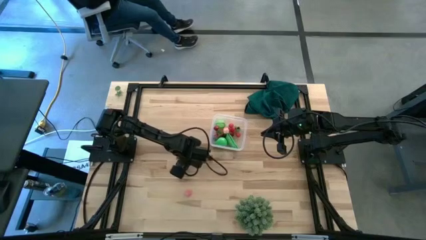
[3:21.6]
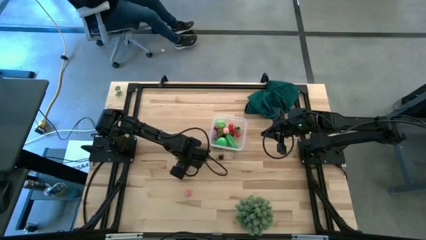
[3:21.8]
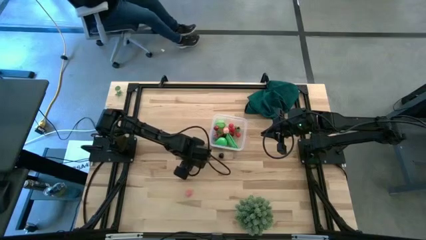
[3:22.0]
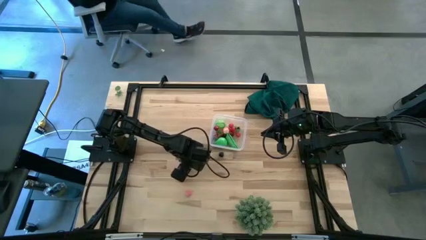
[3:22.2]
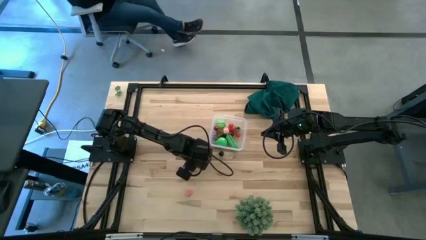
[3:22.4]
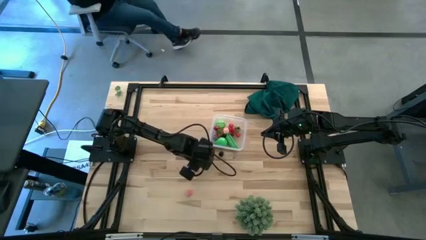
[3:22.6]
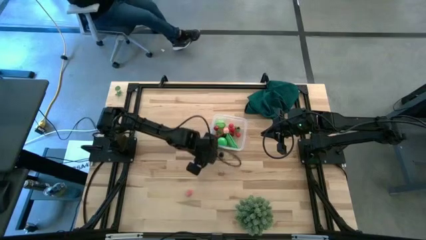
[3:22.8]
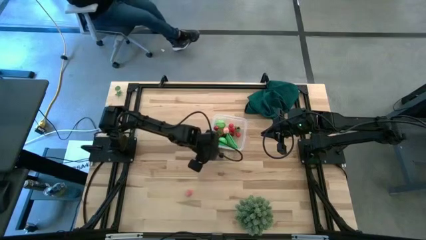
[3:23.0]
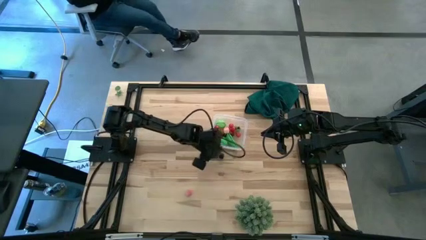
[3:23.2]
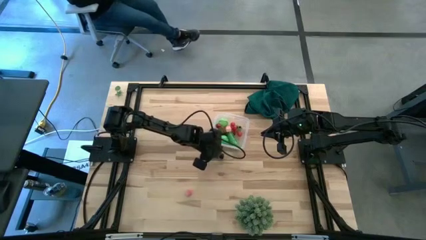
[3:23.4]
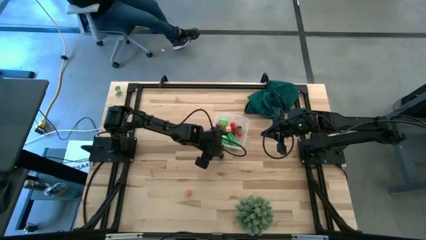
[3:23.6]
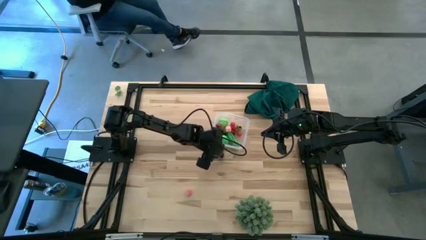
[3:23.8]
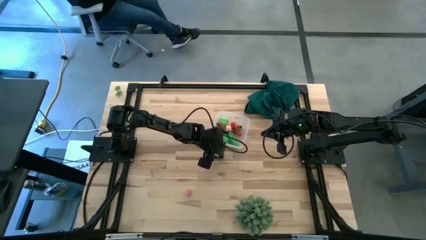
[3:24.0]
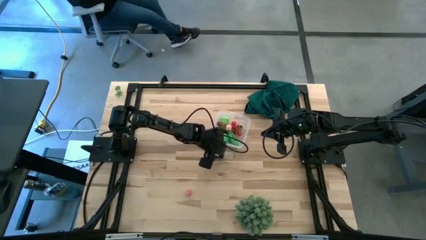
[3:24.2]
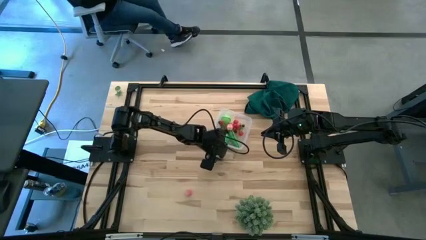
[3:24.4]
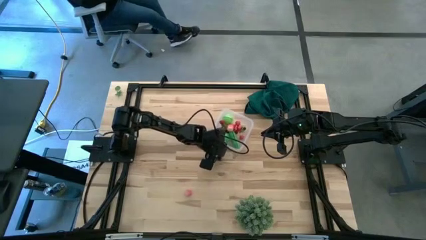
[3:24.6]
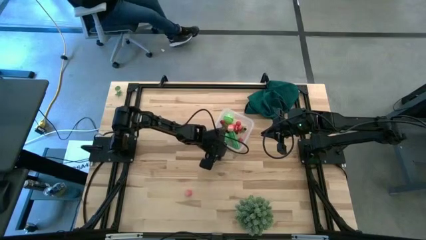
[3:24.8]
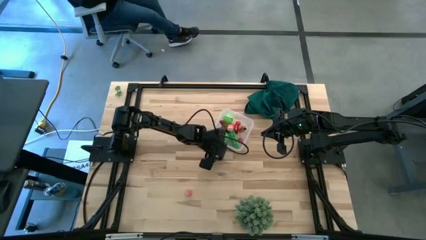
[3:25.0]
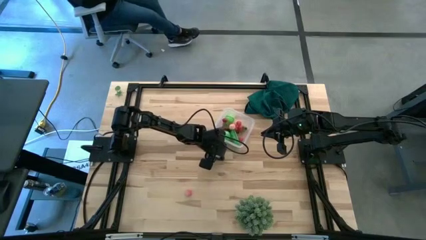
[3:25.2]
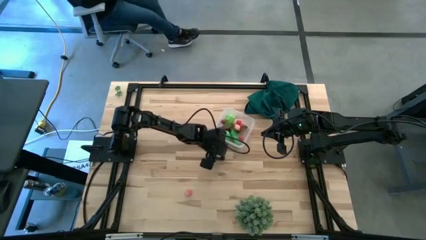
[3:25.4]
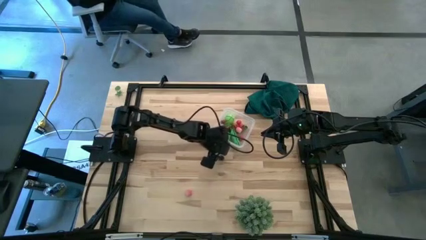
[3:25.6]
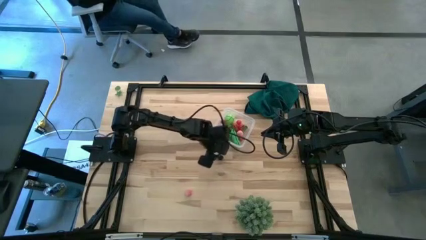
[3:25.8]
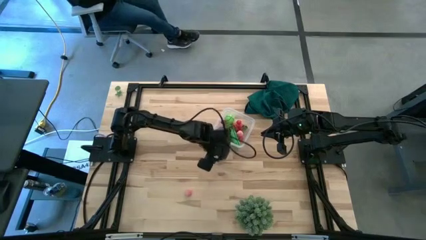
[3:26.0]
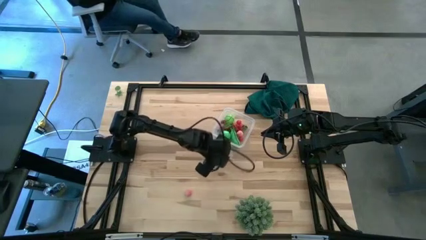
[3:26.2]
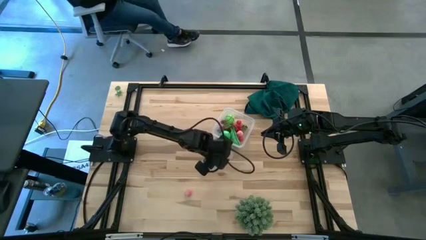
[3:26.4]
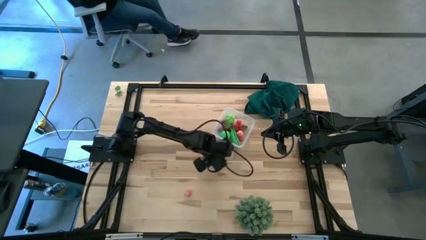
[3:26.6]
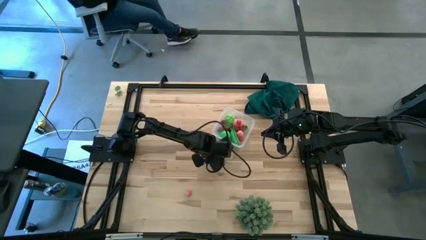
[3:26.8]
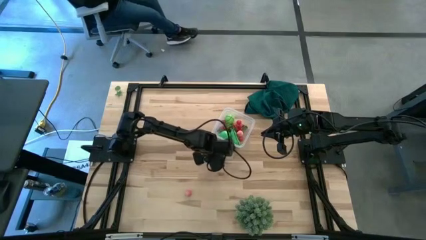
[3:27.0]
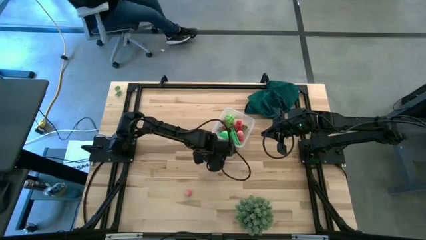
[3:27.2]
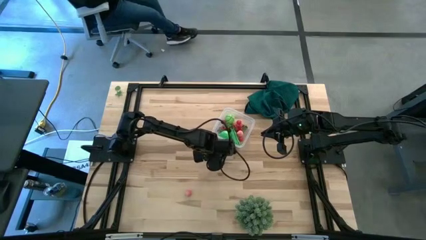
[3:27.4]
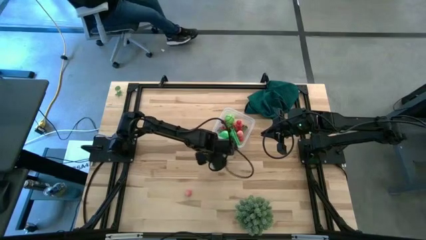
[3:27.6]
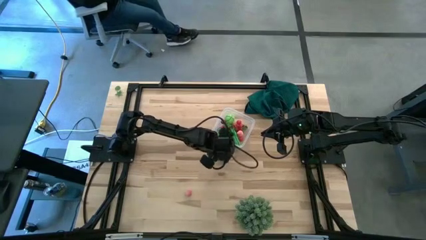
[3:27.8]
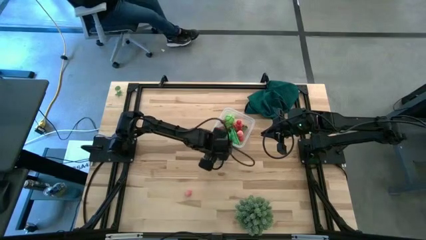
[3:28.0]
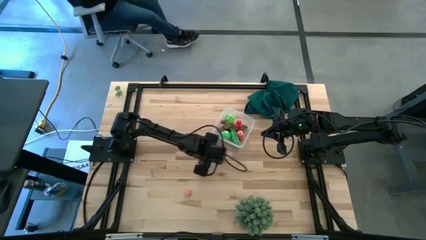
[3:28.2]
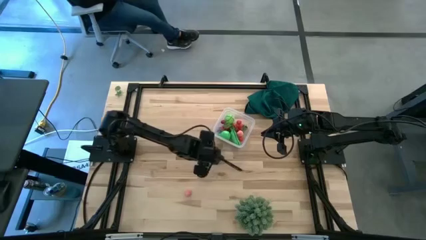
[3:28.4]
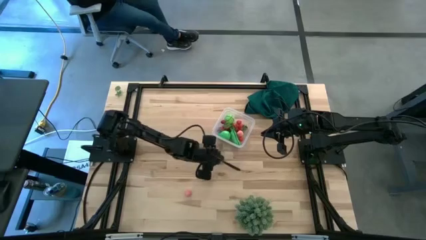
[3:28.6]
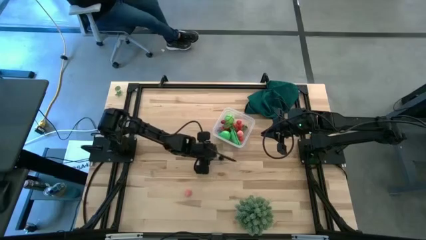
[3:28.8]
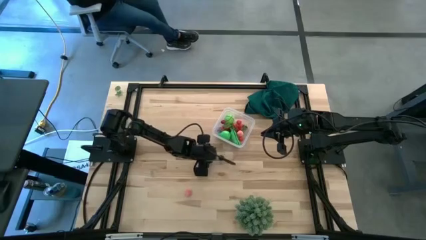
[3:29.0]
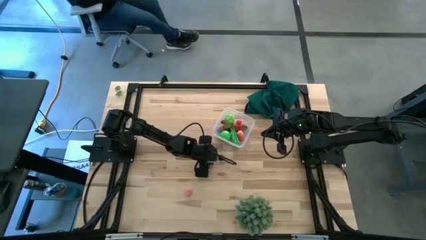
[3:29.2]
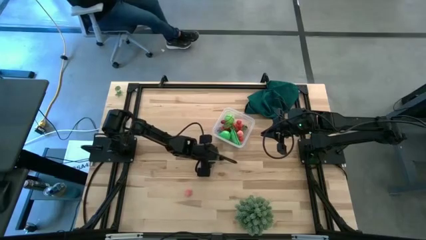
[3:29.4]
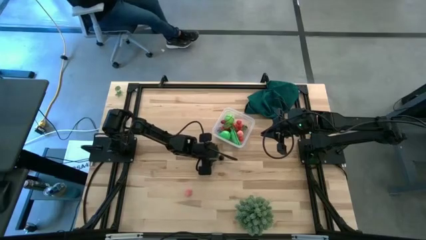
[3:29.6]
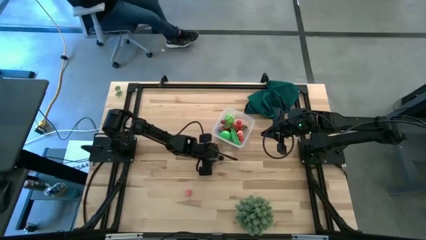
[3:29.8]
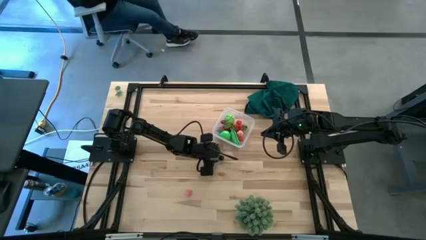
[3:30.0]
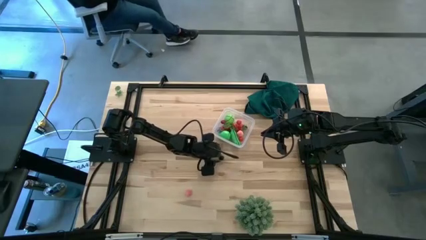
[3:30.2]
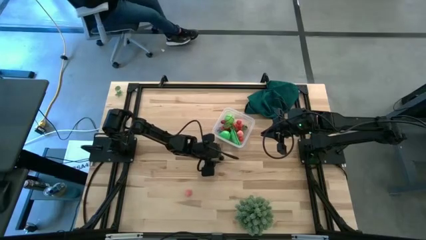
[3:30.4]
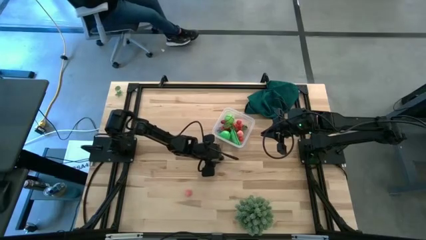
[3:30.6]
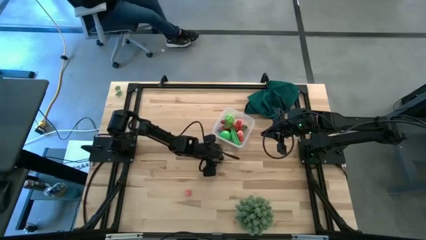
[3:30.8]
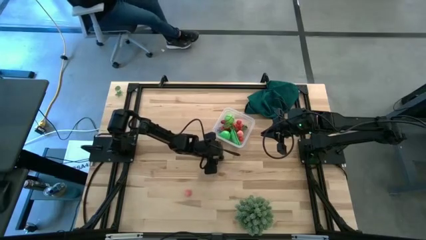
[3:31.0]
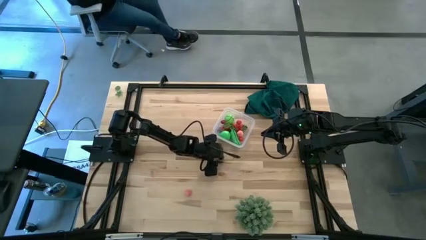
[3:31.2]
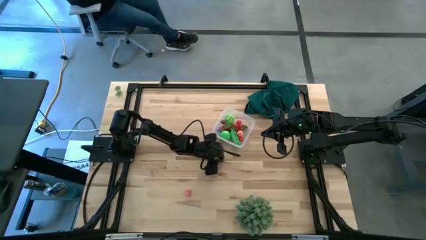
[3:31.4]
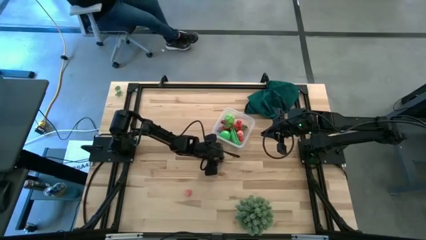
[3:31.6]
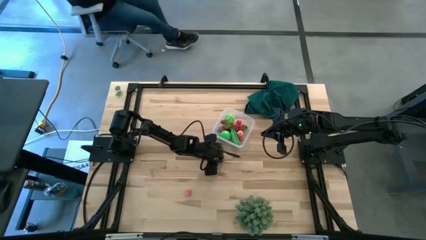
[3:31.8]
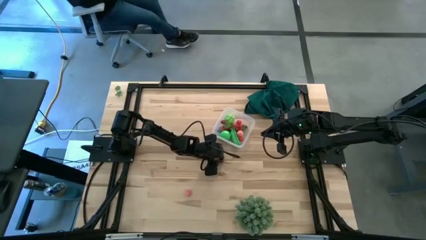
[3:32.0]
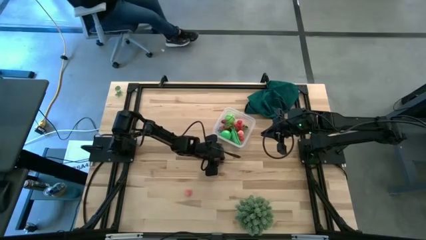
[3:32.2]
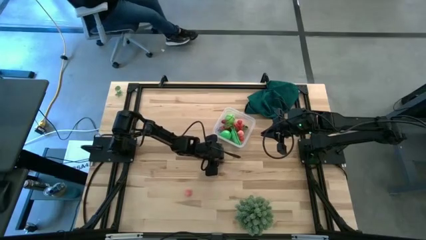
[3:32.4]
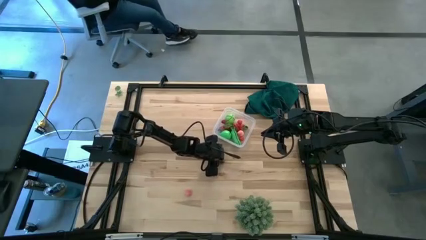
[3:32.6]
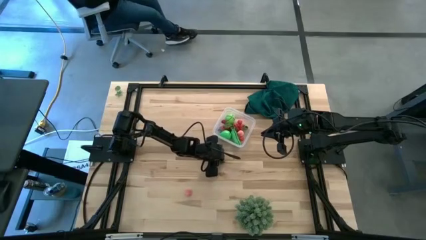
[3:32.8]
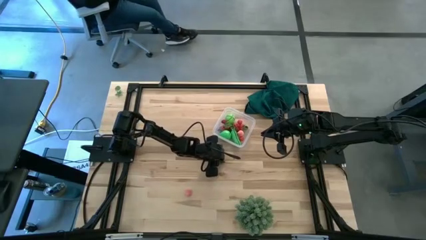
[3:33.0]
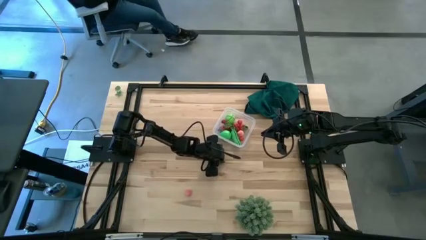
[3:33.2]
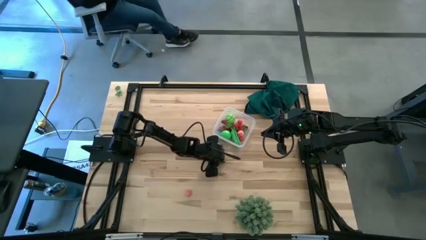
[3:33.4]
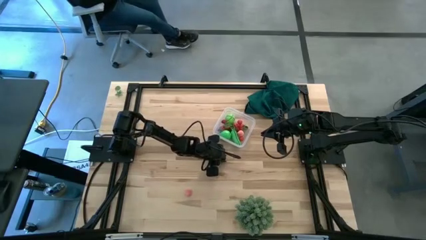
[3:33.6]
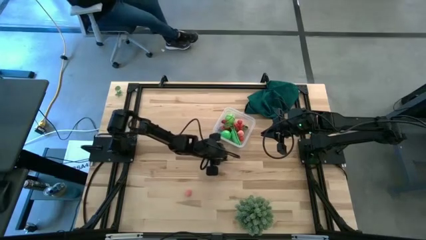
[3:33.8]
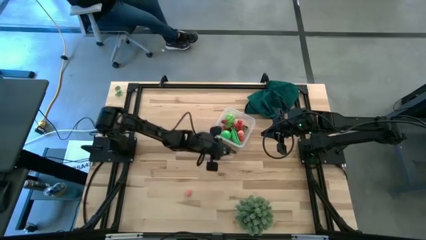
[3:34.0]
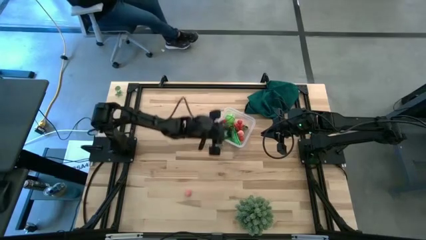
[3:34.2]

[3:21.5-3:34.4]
Task: Pick and placing Produce into tupperware
Put the black cherry into the transparent bin

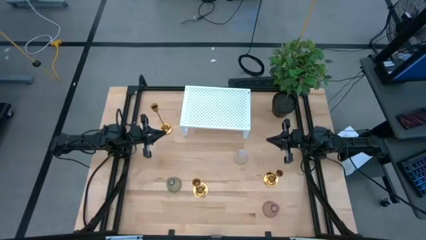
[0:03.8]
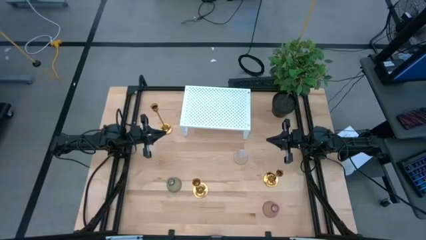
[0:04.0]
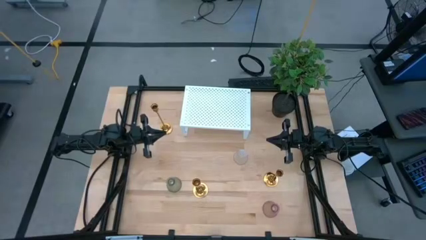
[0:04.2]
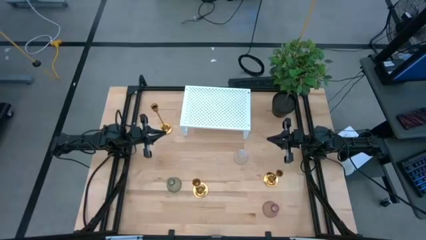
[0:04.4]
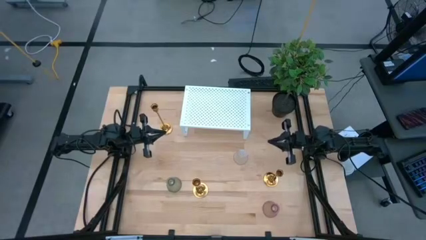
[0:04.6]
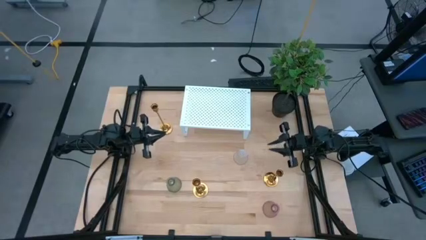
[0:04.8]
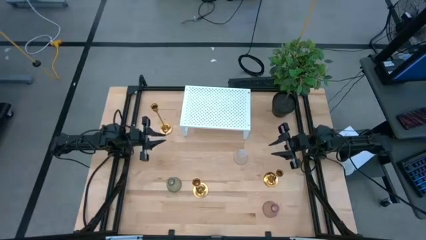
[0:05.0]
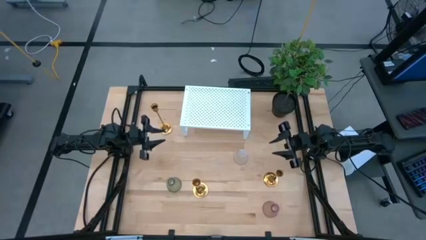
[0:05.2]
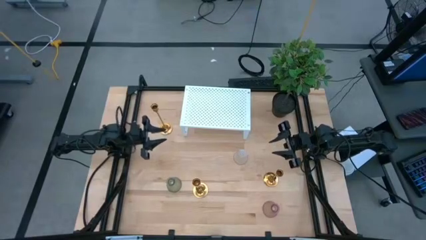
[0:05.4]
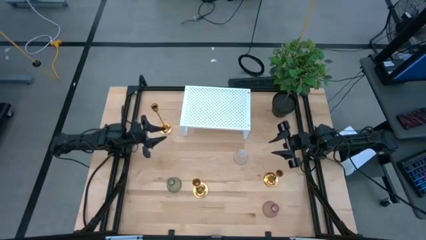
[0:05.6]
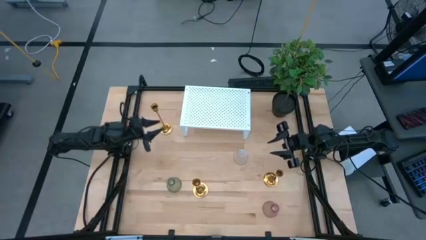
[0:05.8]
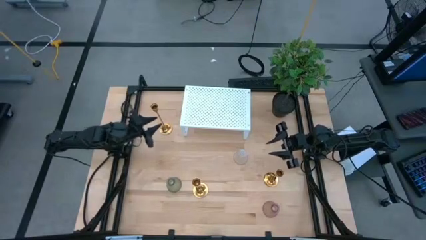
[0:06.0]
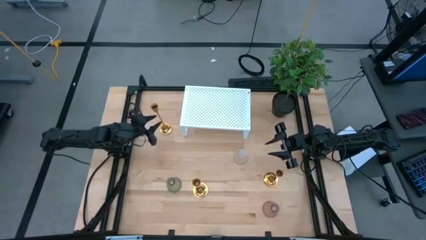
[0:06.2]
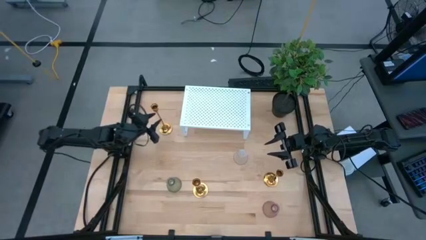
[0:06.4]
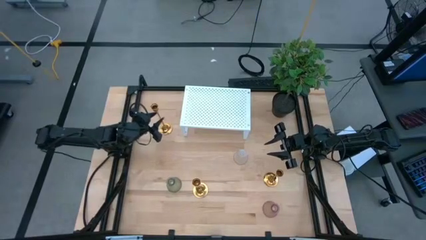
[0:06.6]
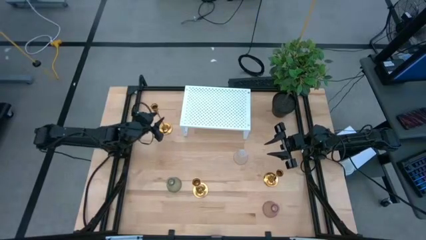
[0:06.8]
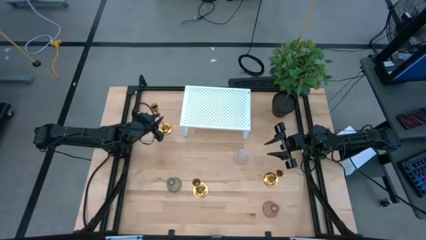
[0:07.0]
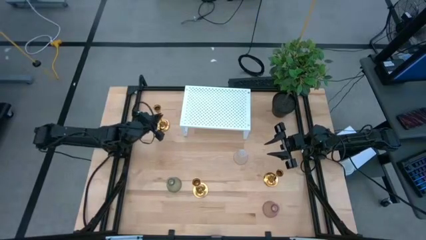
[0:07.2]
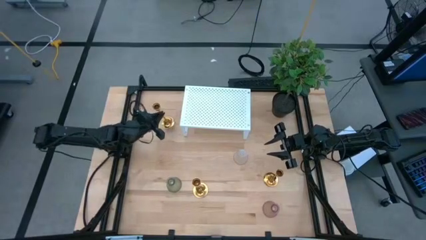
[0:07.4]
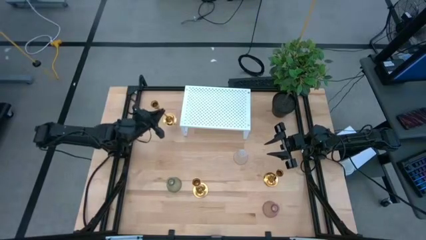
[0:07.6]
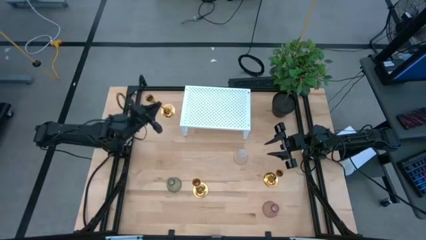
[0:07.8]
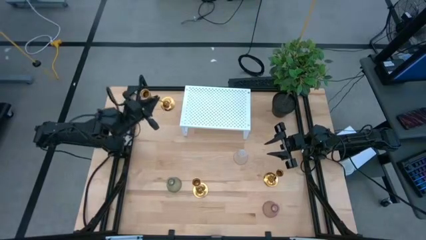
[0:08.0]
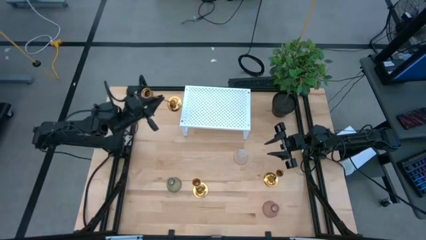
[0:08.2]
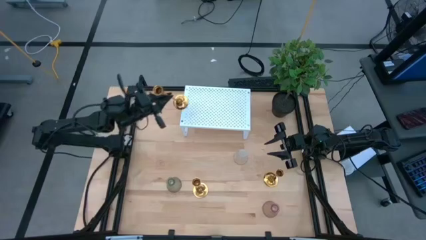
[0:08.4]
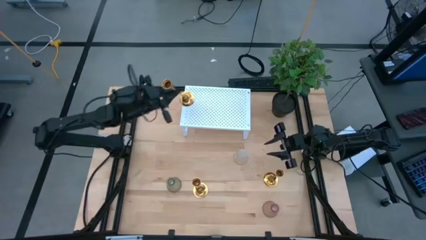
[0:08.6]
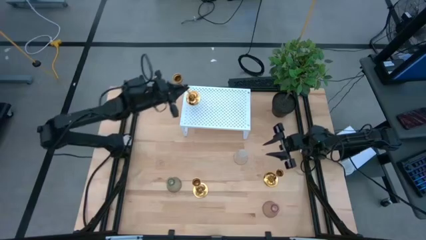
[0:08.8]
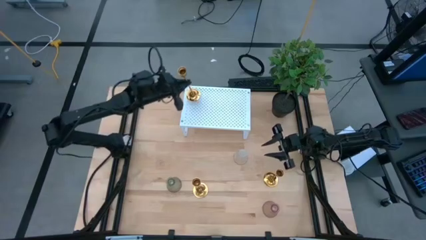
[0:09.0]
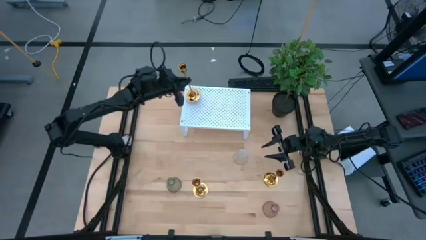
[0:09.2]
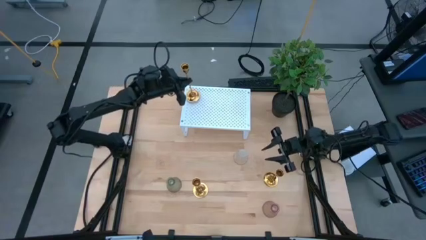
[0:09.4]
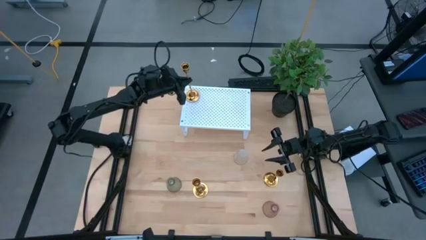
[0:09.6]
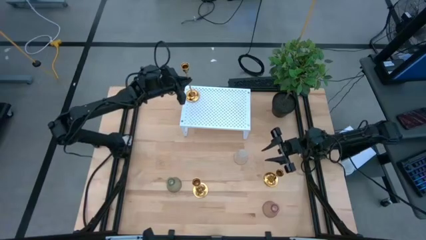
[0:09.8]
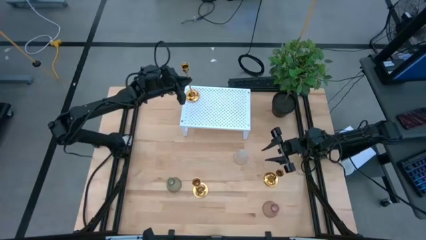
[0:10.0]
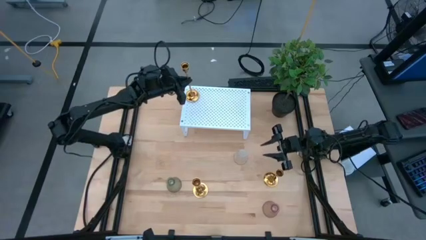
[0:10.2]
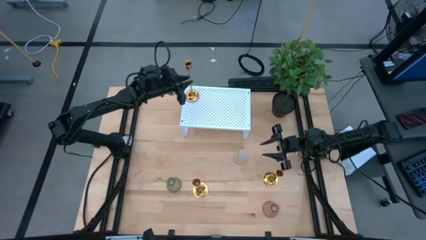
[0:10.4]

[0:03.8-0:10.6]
Task: Pick & Place candle stick holders
Put the top gold candle holder on the shelf
